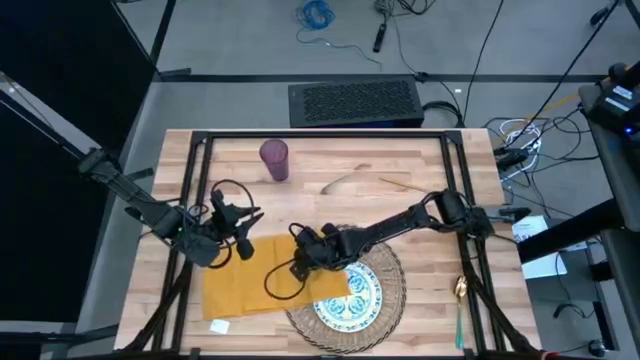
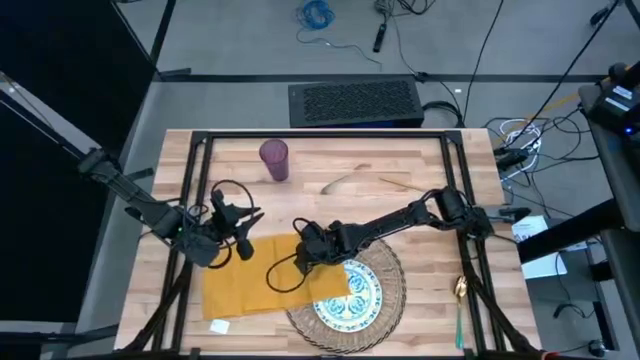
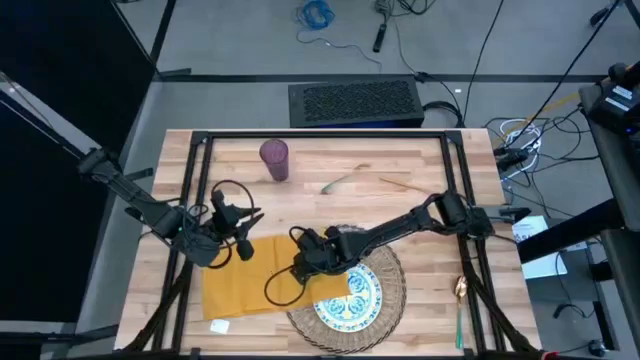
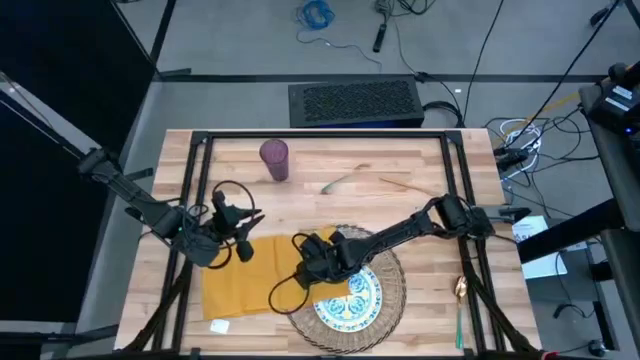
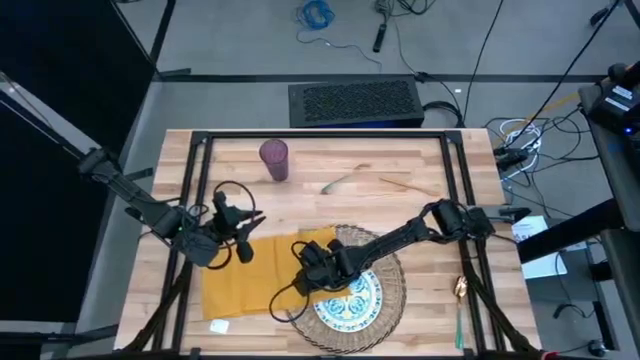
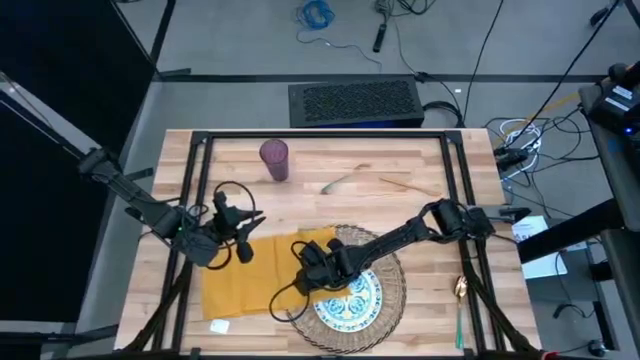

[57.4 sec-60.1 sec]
Task: Set table place
Fold the yellow table napkin

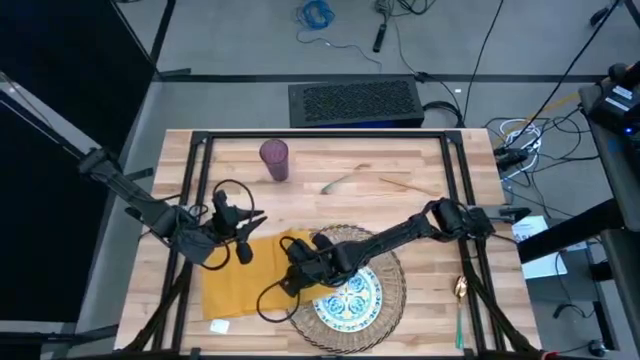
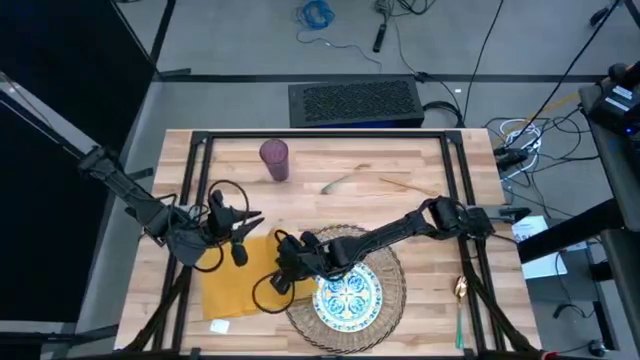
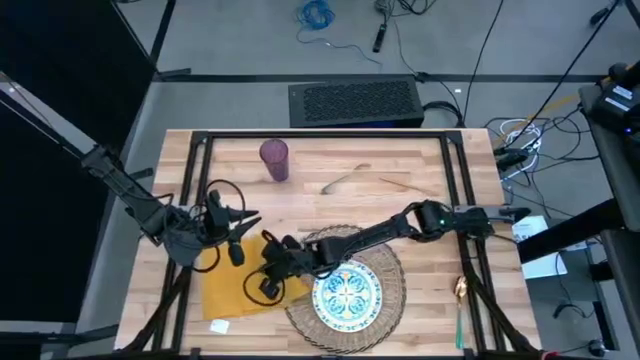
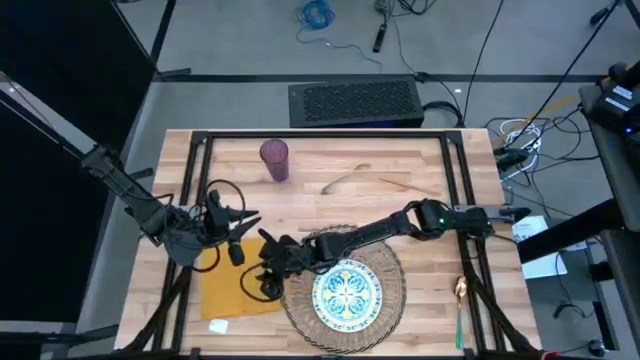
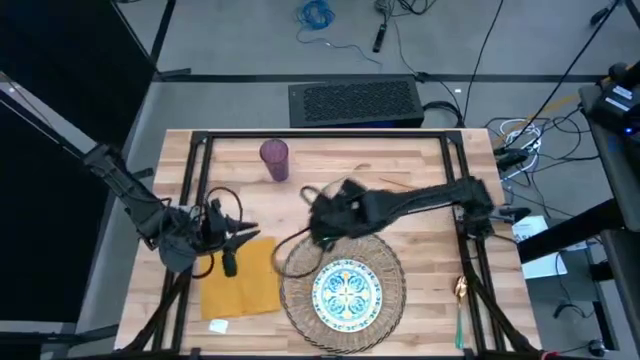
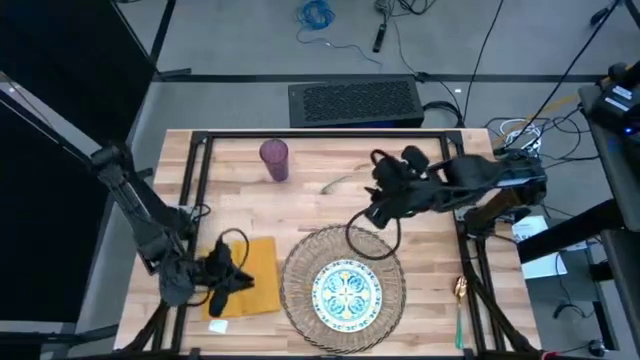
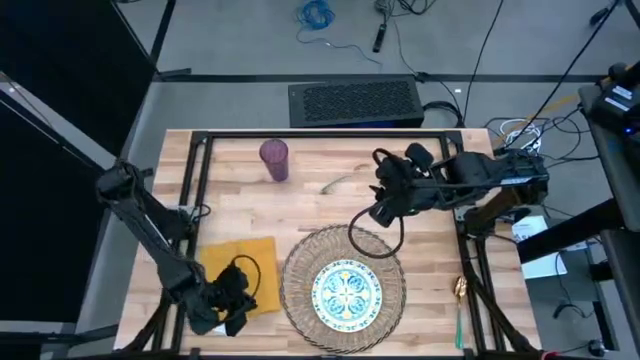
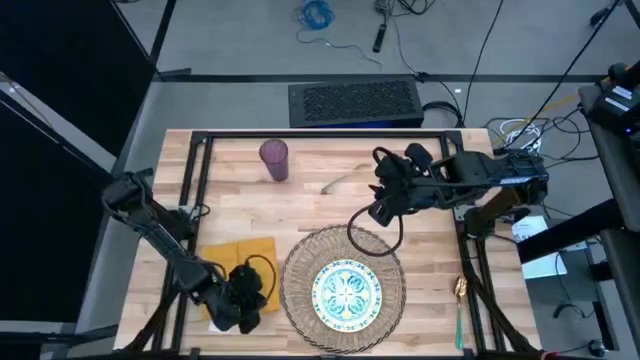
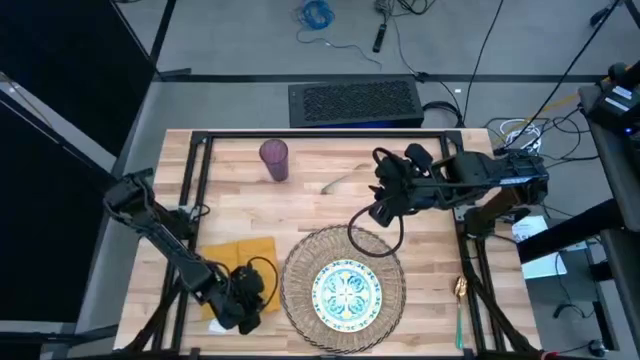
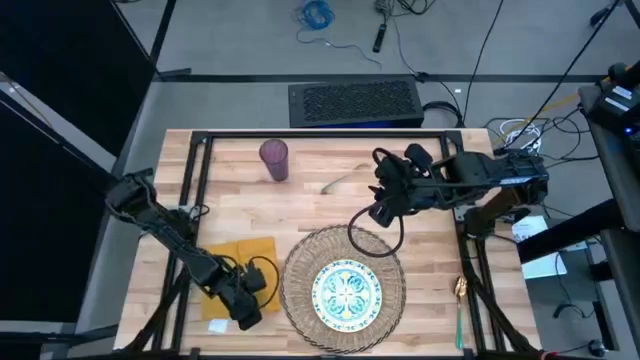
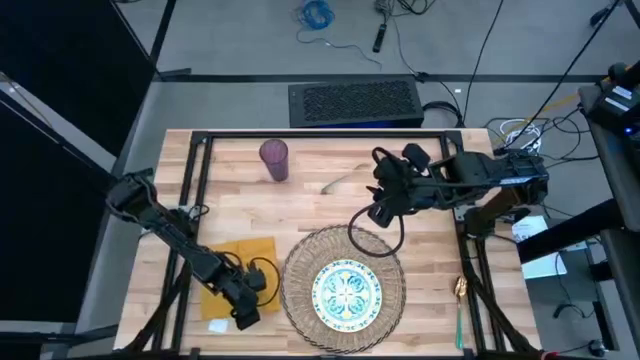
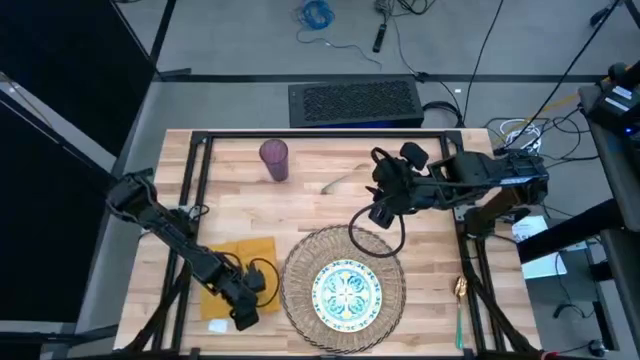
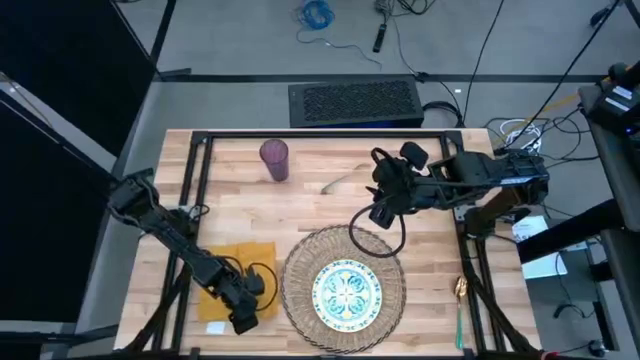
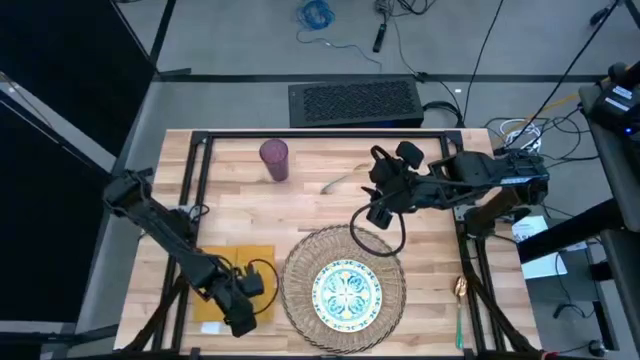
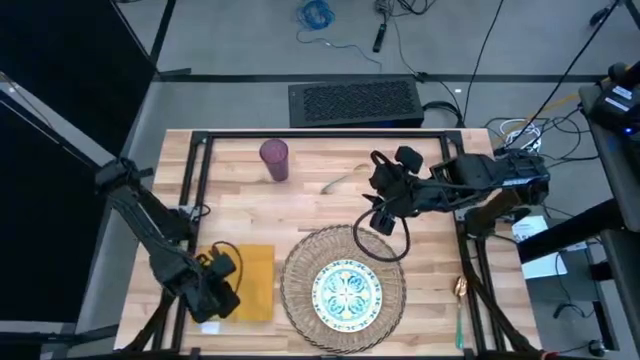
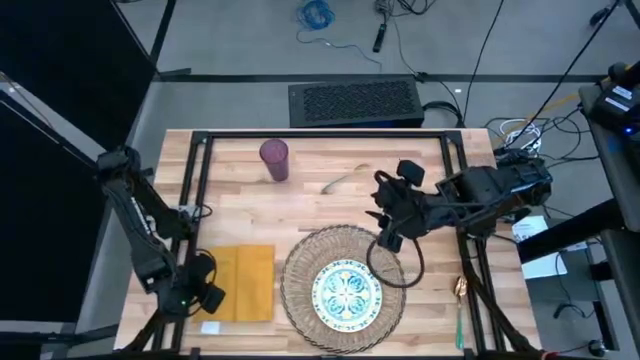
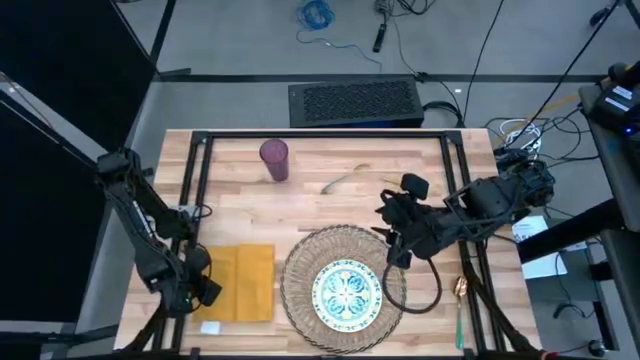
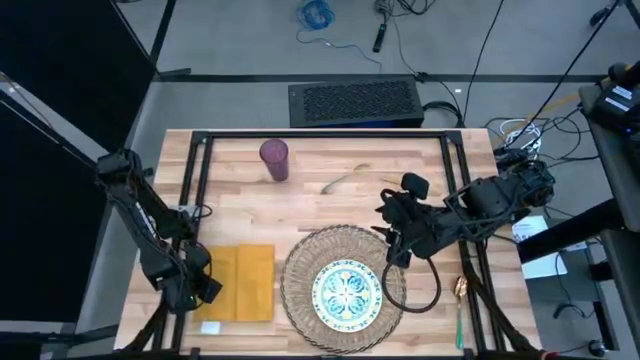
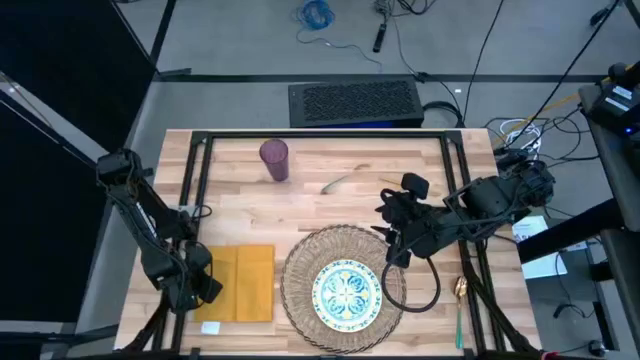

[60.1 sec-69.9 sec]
Fold the yellow table napkin
